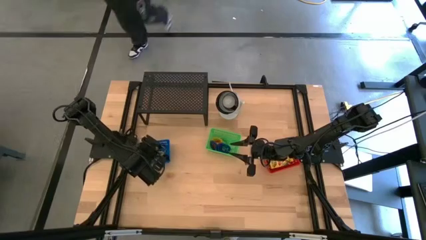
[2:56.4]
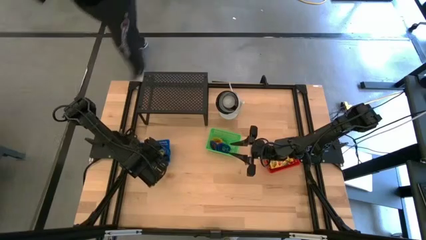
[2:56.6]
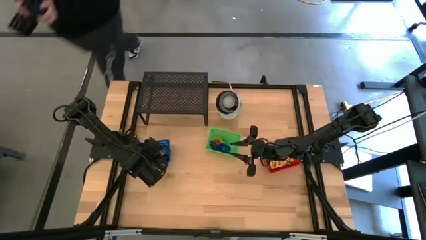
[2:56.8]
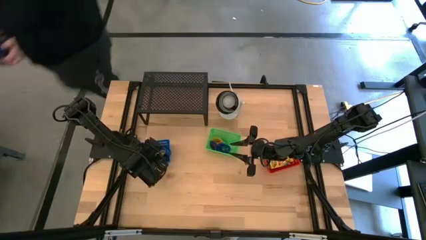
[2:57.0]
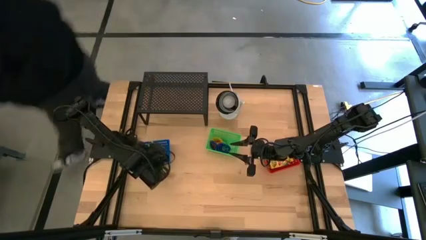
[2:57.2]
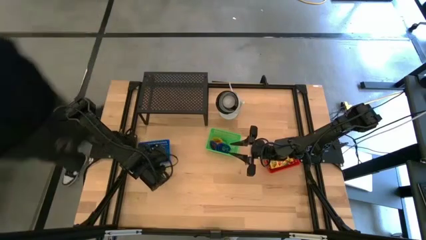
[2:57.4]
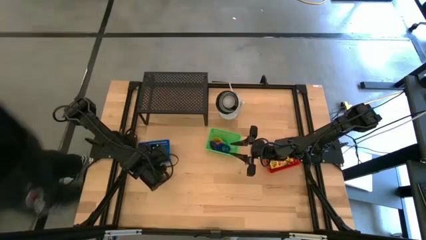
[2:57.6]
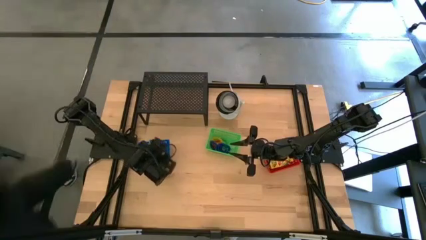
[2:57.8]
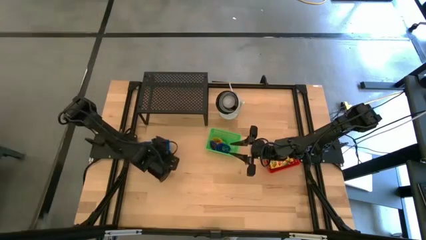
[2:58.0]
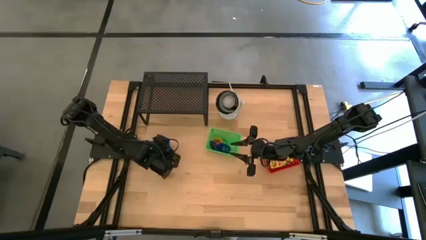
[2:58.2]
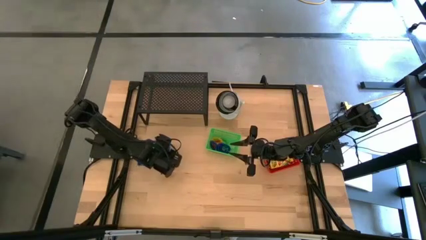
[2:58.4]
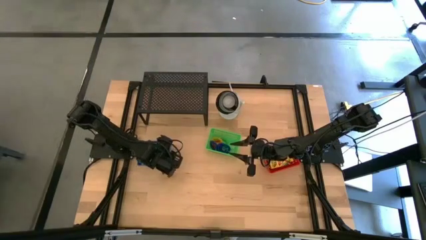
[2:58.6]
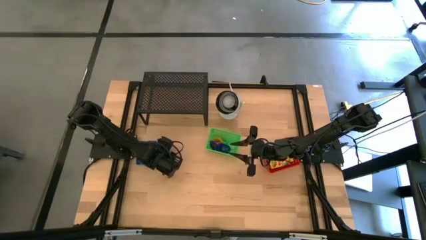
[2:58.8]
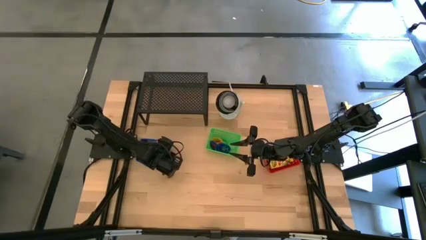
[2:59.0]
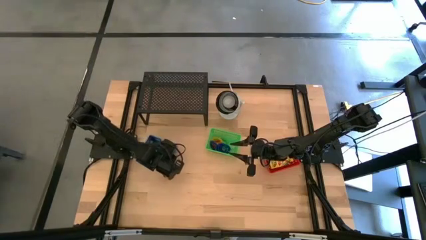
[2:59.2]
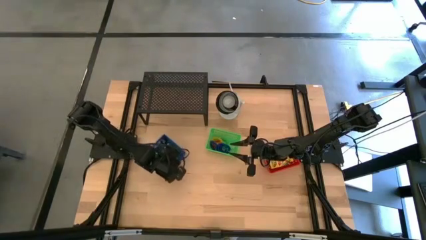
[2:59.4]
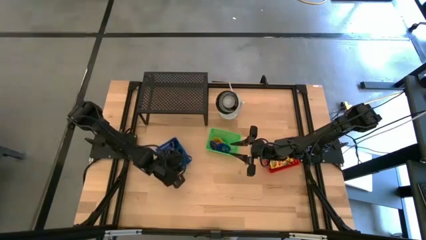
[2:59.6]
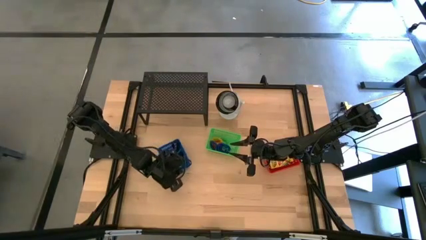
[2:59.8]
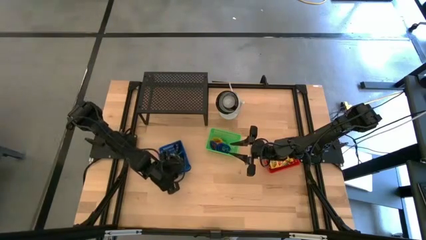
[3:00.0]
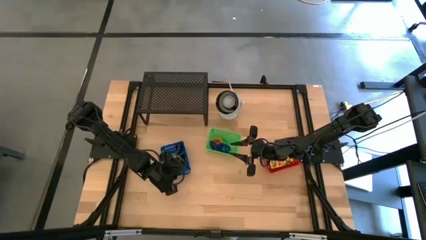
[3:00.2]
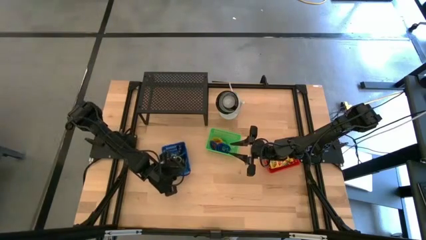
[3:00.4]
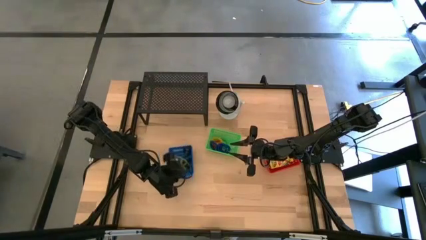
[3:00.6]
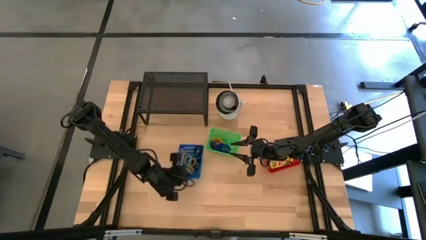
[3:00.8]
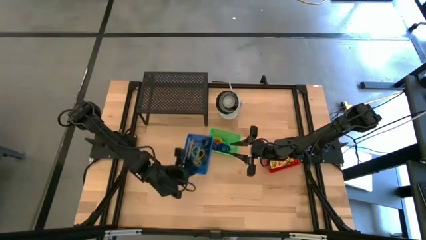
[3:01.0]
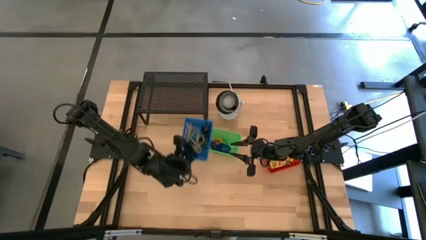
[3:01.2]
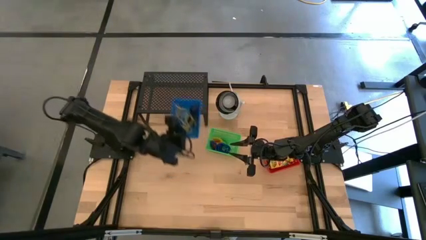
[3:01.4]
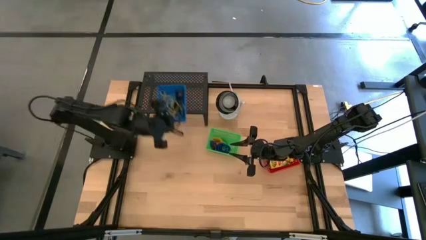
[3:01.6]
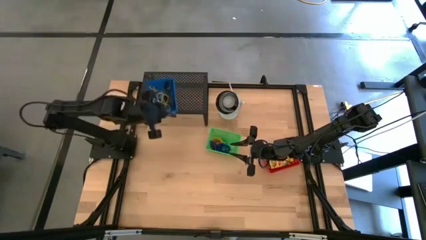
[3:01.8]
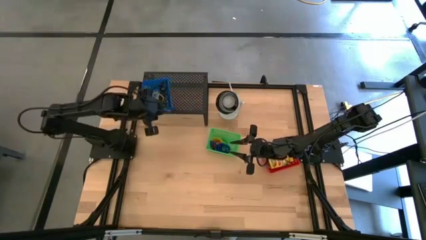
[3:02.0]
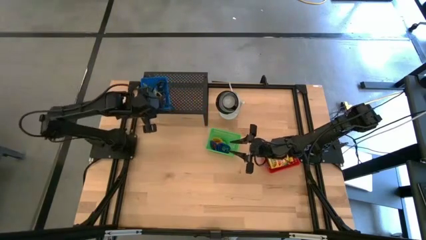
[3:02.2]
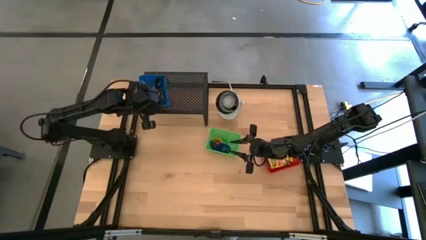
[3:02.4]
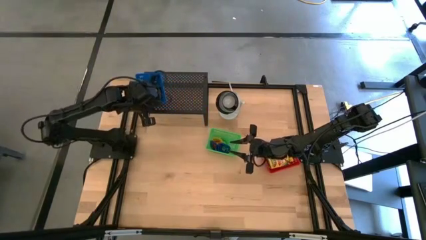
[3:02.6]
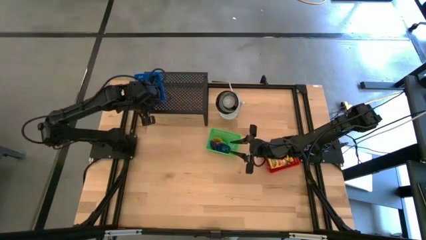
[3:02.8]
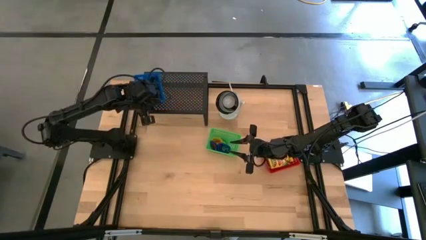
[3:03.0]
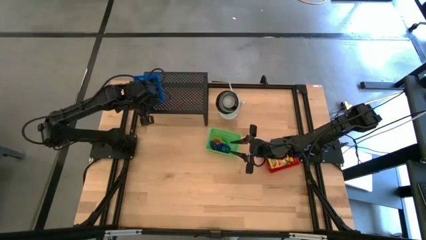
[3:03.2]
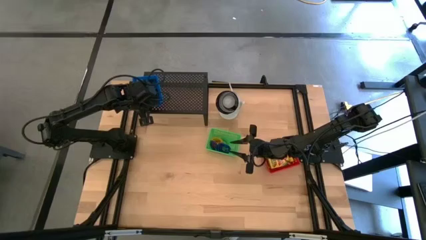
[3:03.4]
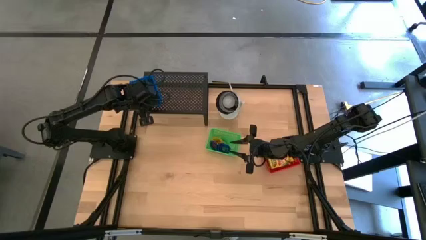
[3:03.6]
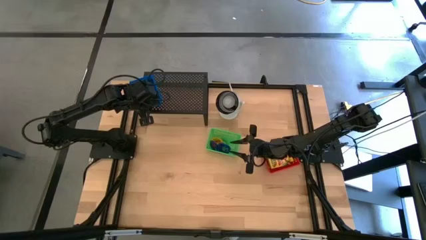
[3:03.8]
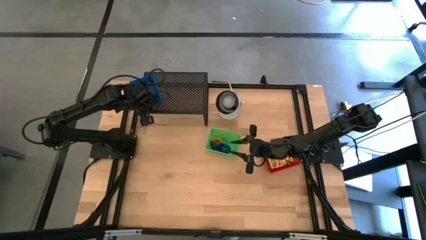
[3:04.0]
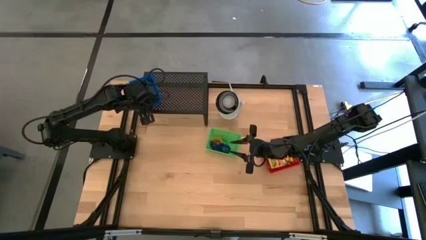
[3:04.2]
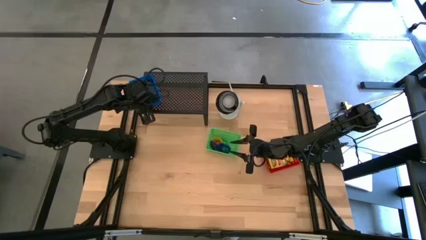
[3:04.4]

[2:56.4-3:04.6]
Task: Pick & Place Office Desk Supplies
Put the blue bin on the shelf

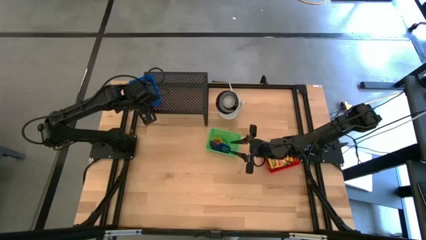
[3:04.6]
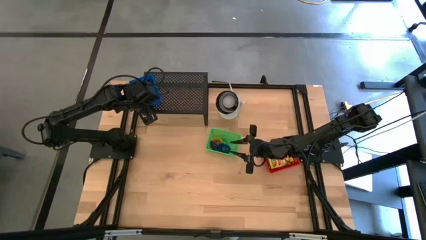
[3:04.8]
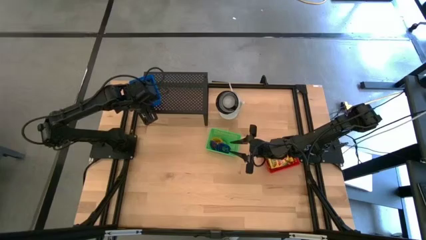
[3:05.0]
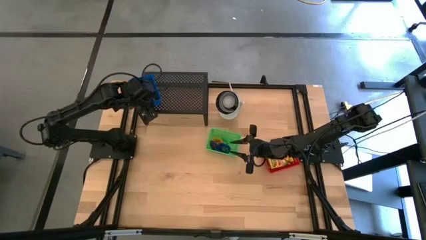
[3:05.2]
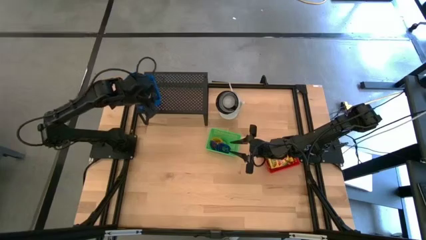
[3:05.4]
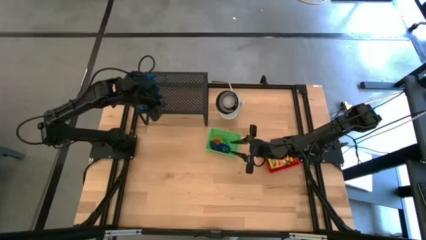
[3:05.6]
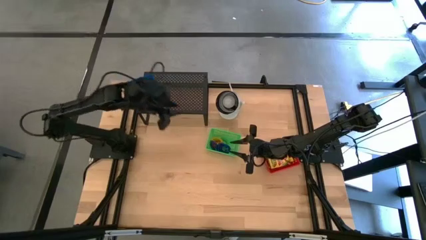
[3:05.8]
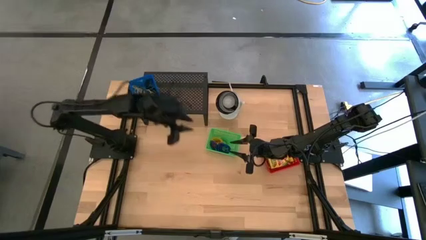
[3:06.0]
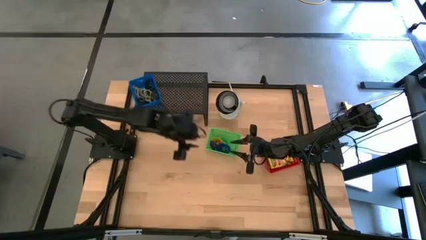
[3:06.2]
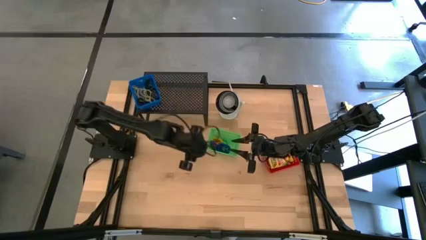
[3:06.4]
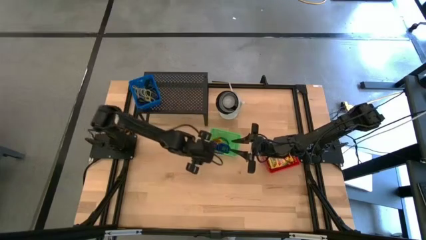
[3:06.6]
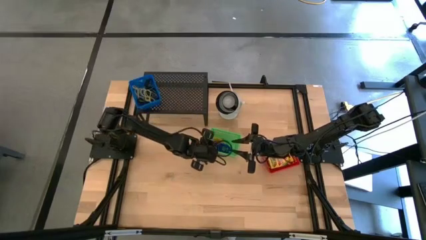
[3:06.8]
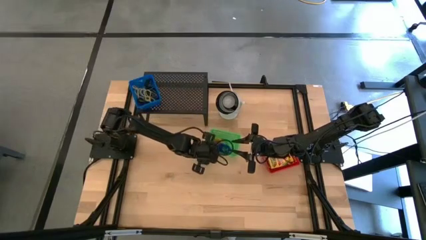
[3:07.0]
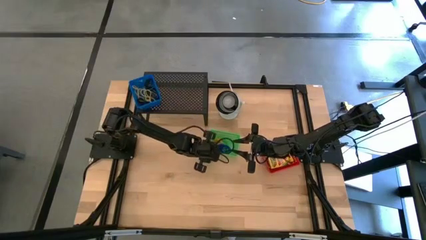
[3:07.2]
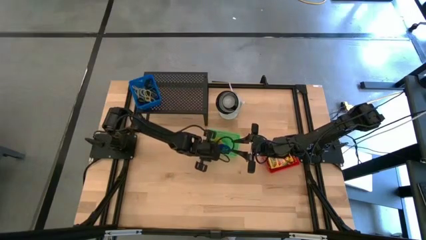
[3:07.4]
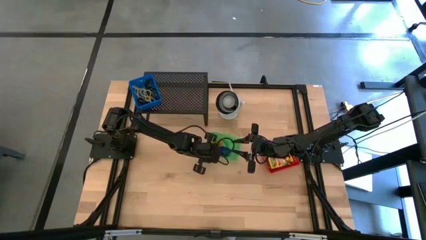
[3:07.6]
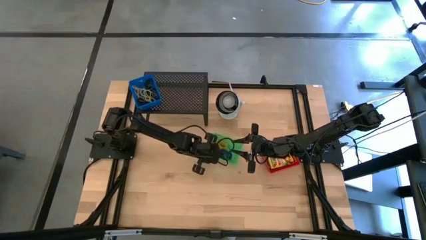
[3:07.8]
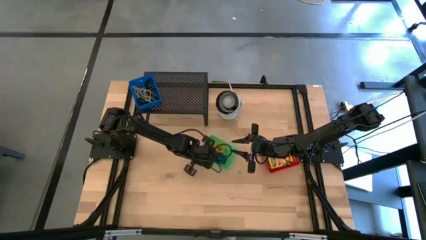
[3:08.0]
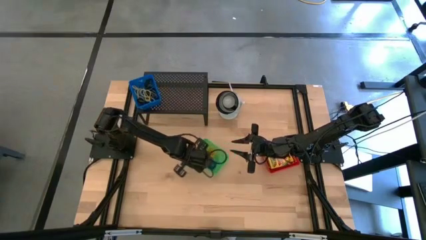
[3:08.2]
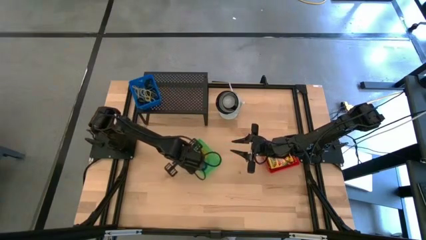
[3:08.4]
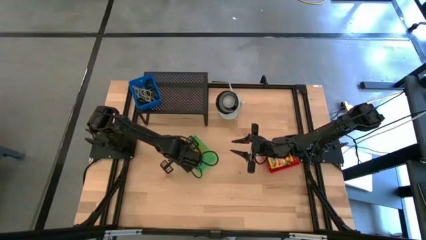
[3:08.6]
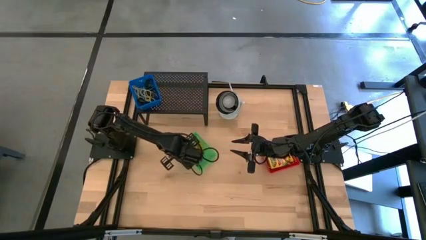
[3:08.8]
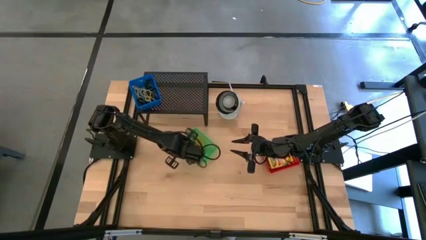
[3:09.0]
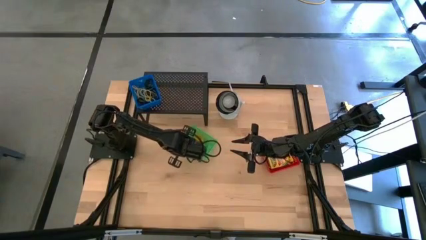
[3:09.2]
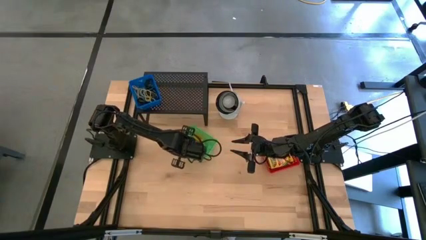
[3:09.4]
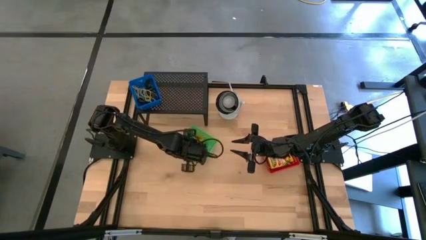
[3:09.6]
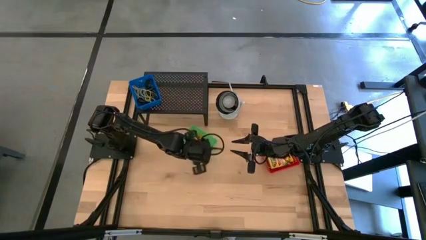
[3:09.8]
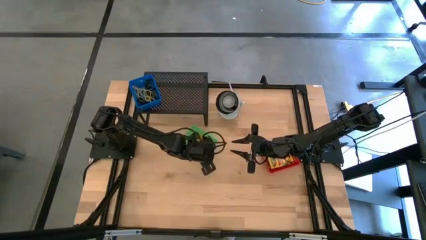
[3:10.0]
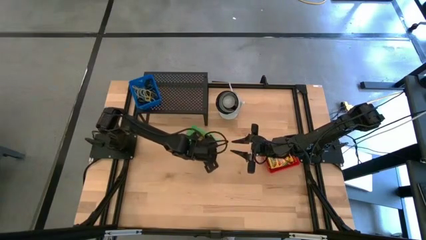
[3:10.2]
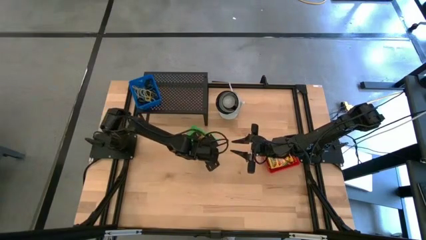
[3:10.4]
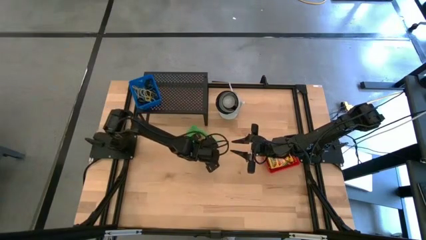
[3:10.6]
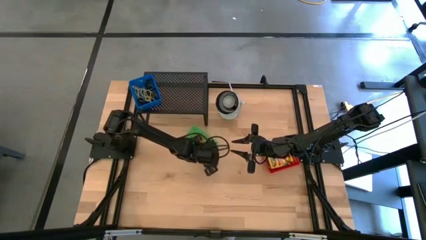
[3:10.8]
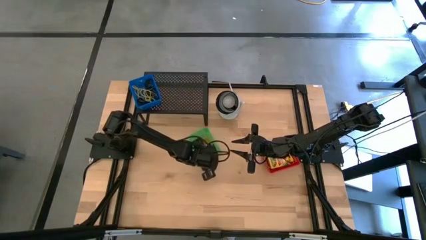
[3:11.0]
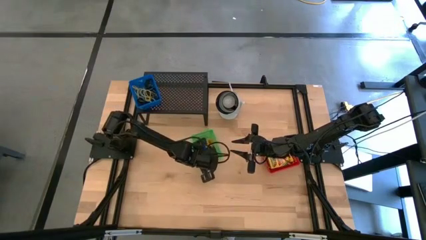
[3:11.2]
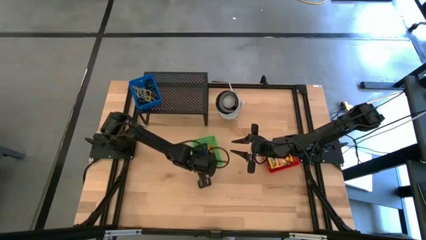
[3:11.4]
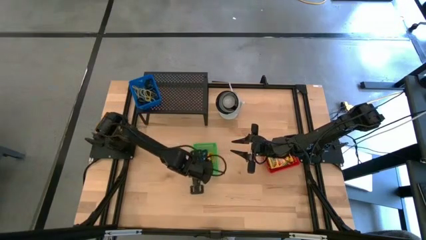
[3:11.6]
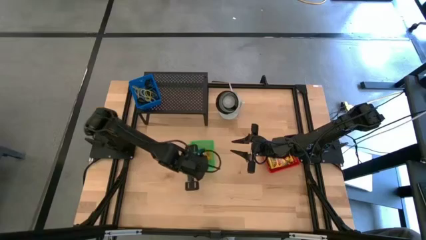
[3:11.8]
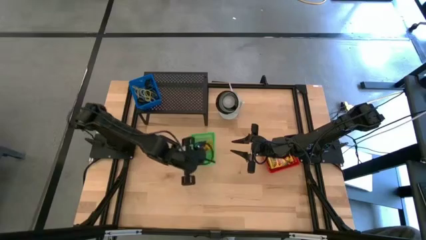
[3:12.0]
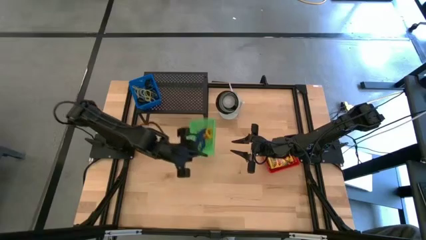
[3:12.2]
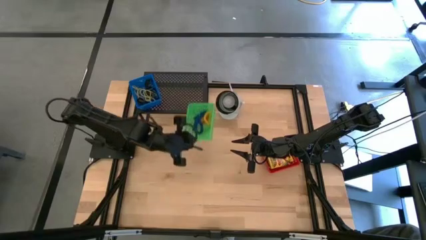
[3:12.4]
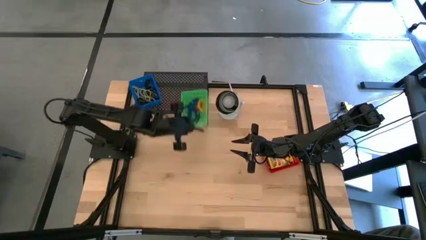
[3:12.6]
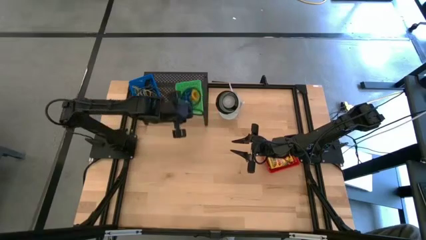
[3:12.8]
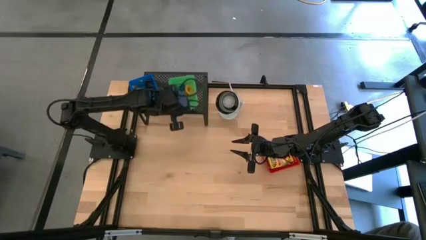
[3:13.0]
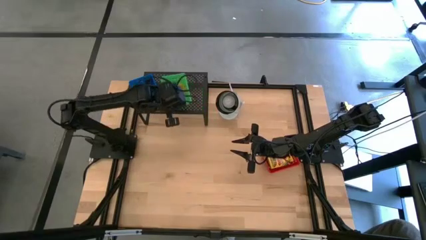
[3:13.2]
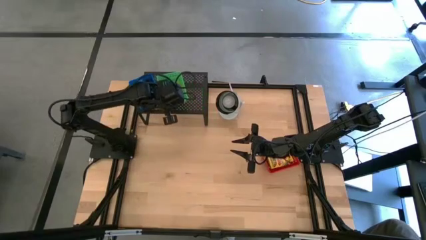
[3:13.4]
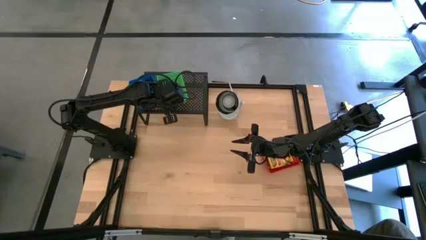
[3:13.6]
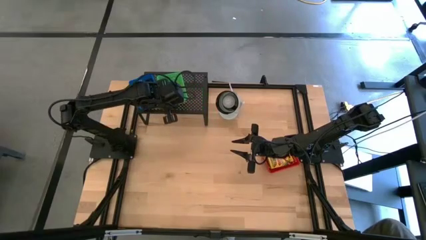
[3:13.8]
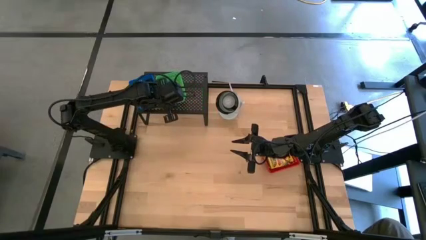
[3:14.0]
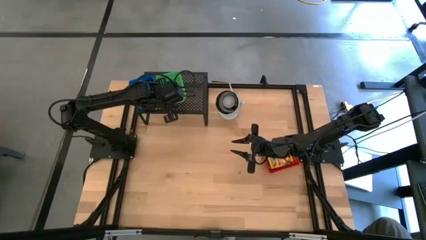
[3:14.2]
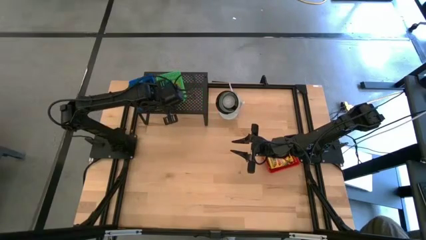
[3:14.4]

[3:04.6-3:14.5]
Put the green bin on the shelf
